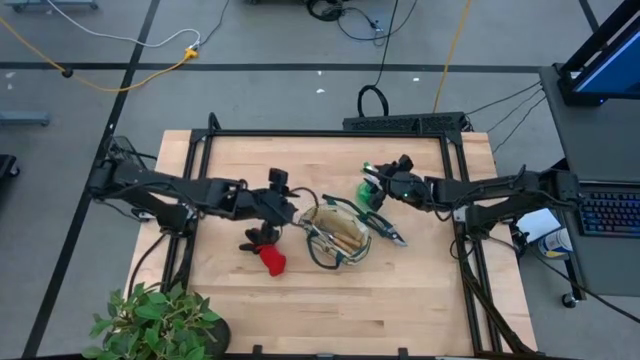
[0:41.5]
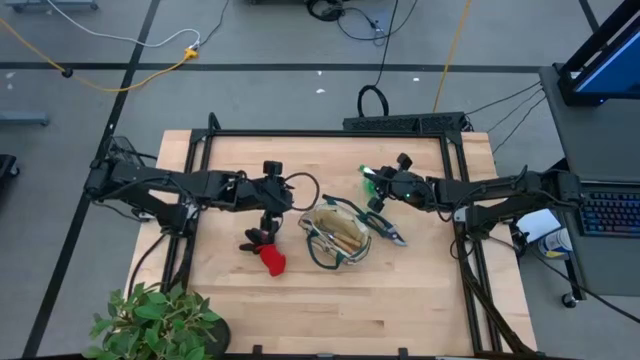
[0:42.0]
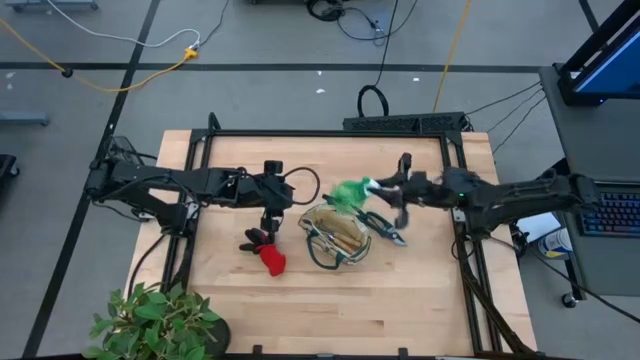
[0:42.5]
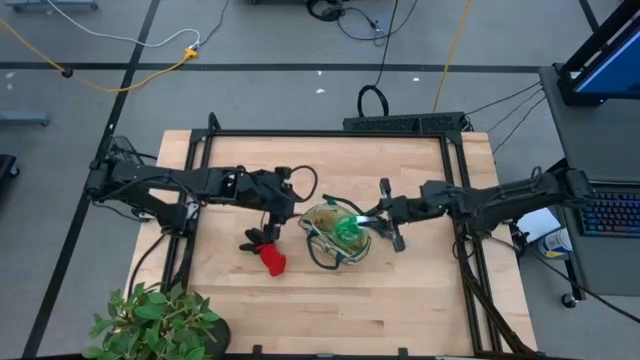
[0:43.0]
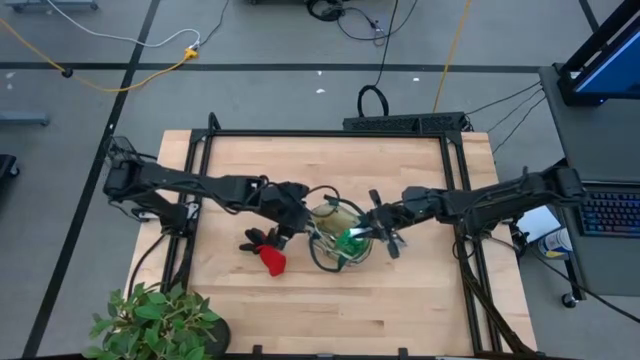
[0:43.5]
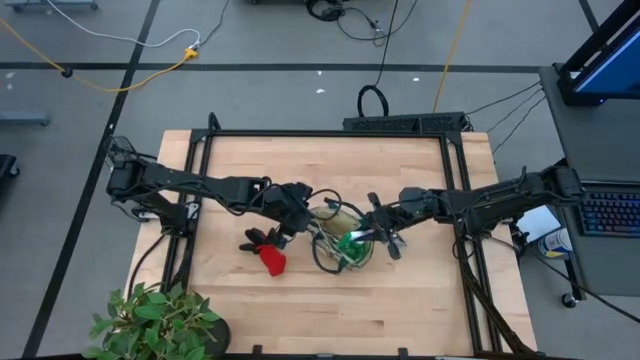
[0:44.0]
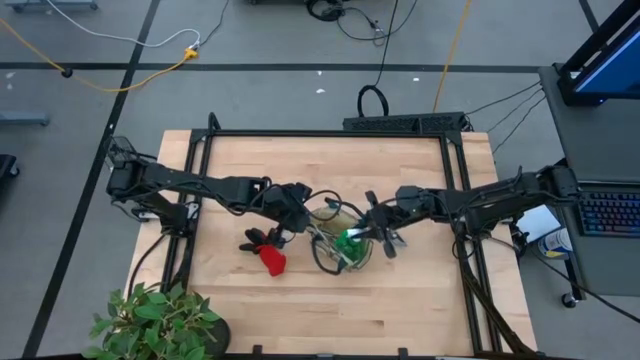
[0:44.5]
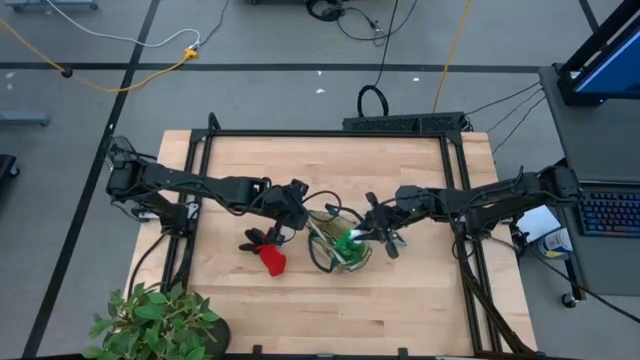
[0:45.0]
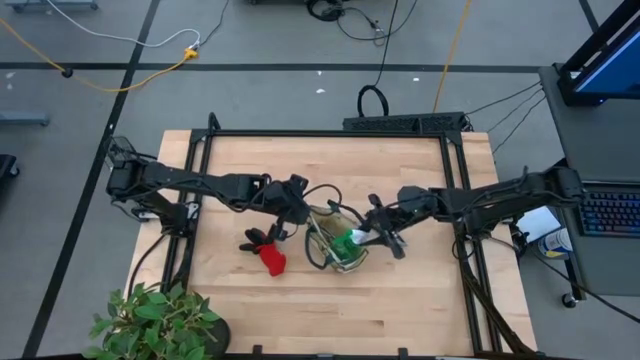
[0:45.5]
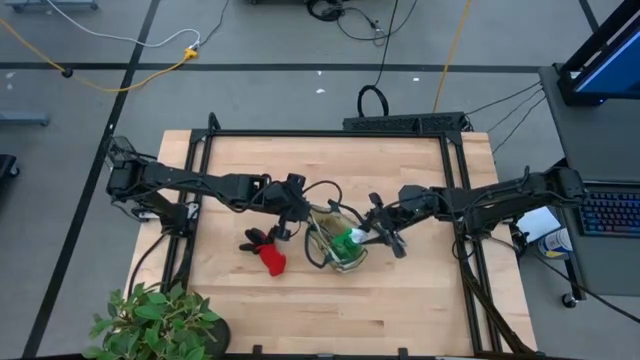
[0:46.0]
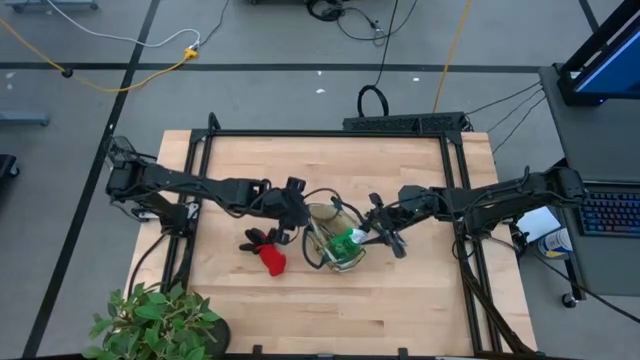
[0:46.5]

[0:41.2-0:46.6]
Task: Pick & Place Garden tools in Gardening bag
Put the green spray bottle into the light brown gardening bag

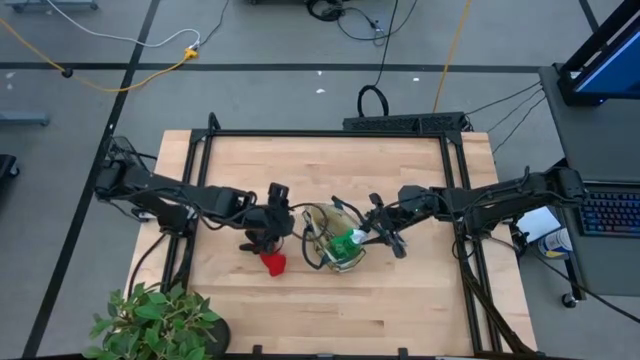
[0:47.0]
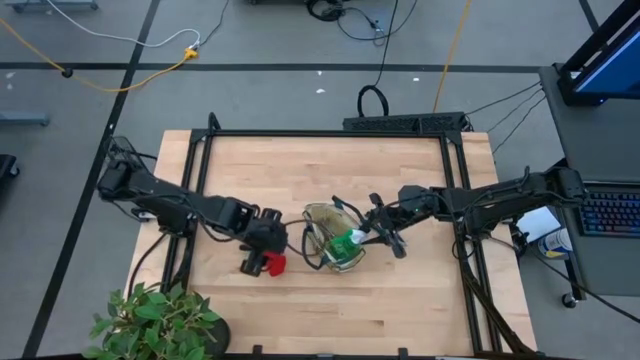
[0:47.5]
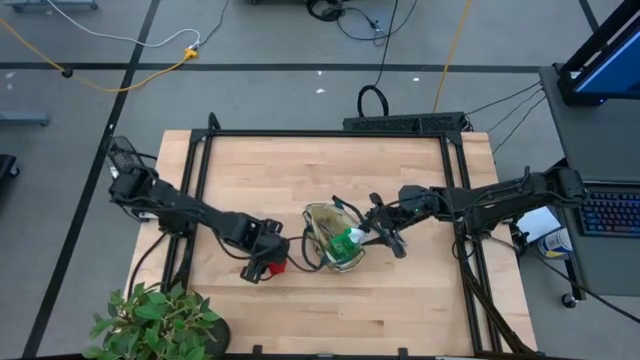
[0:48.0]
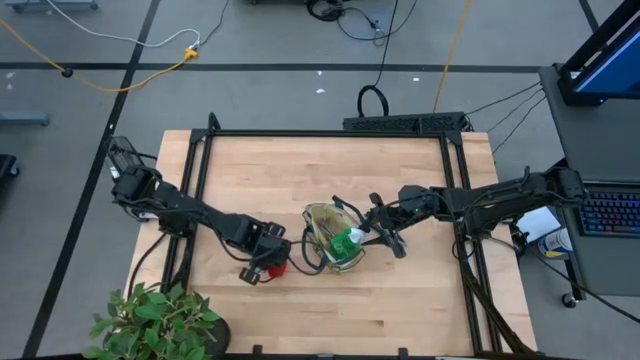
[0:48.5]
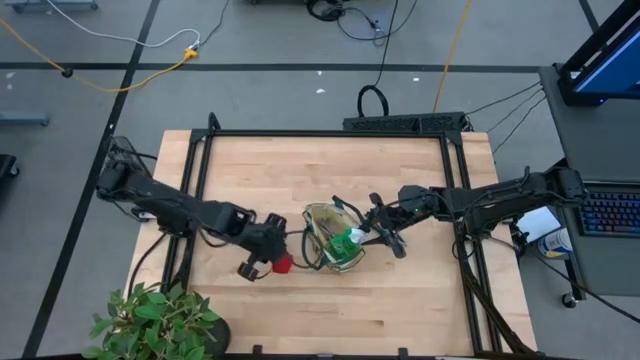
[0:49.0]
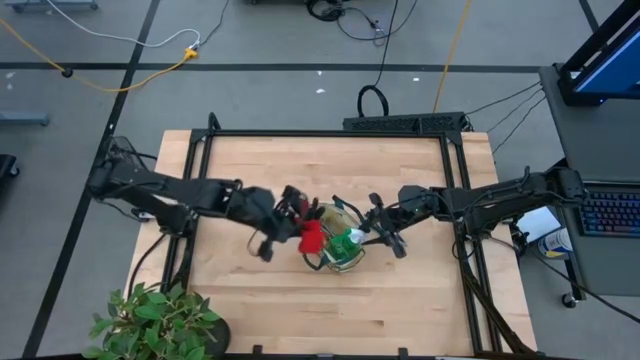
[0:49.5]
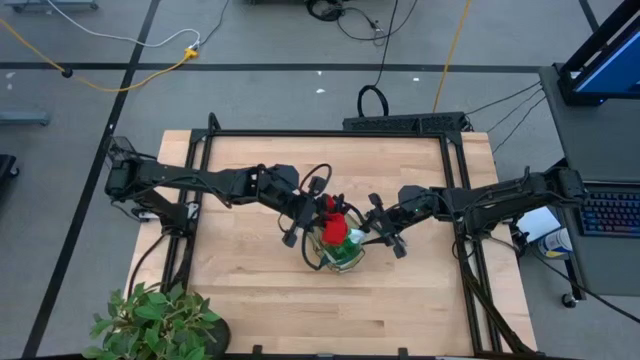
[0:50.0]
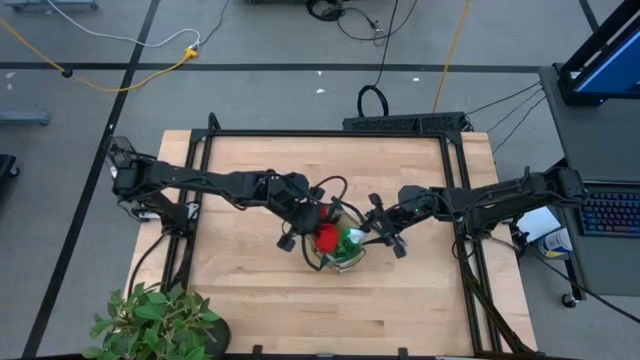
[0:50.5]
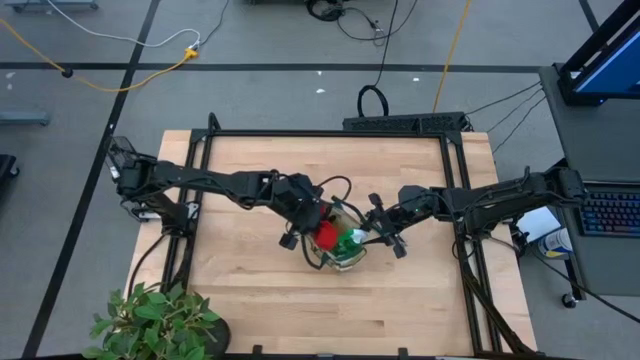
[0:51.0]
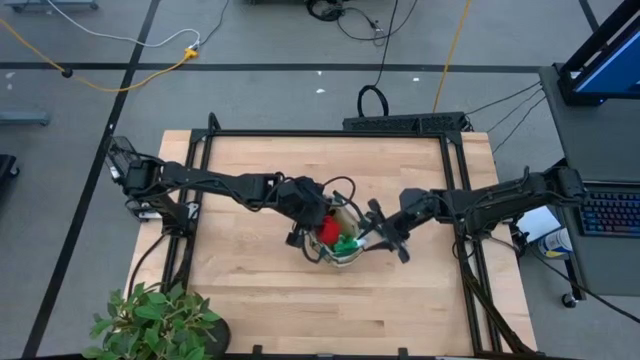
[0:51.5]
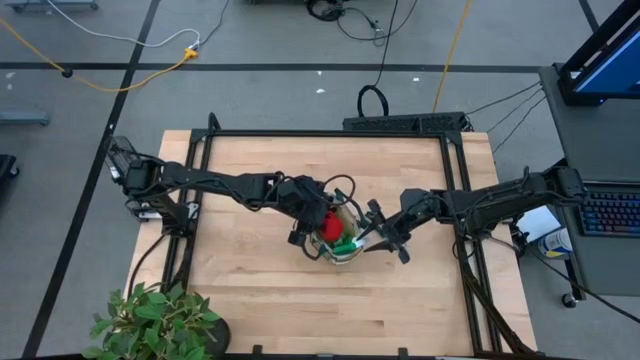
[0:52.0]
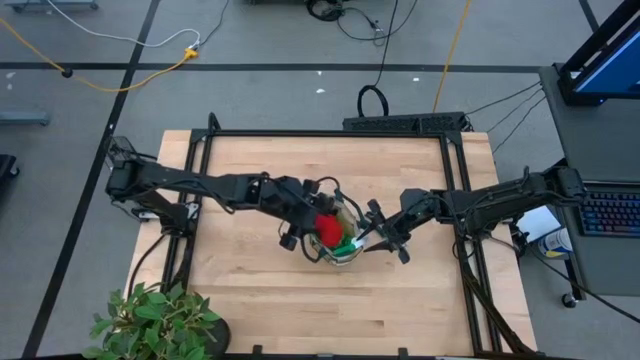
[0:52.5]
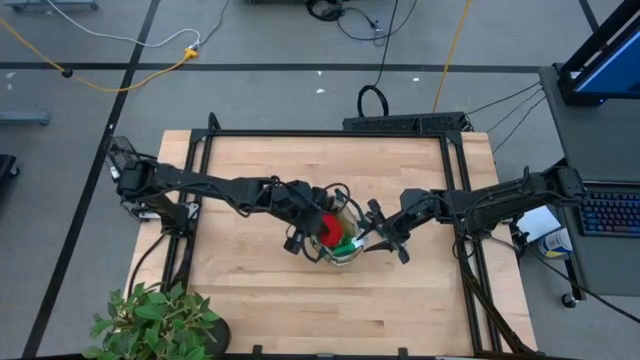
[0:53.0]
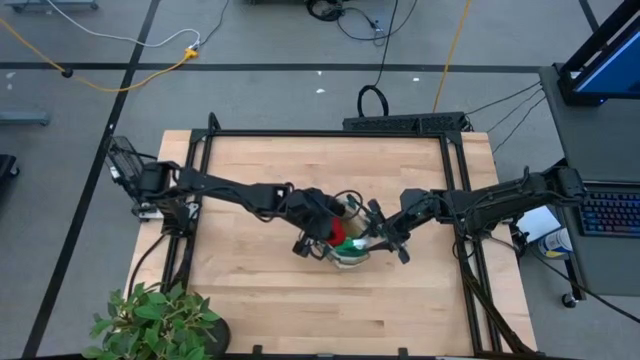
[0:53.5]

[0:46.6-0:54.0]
Put the red gloves into the light brown gardening bag

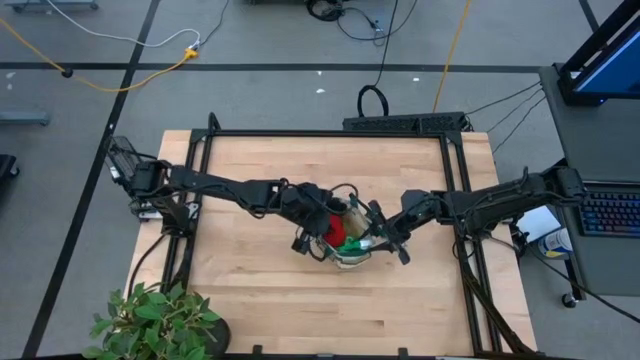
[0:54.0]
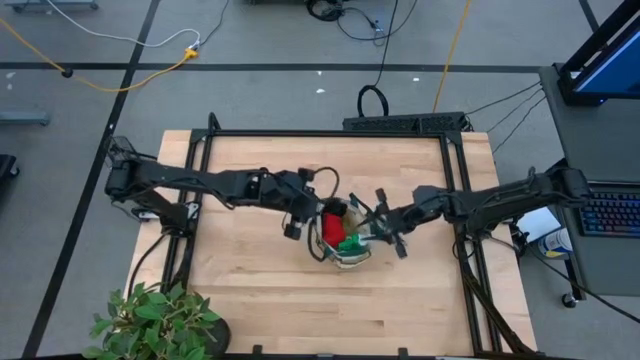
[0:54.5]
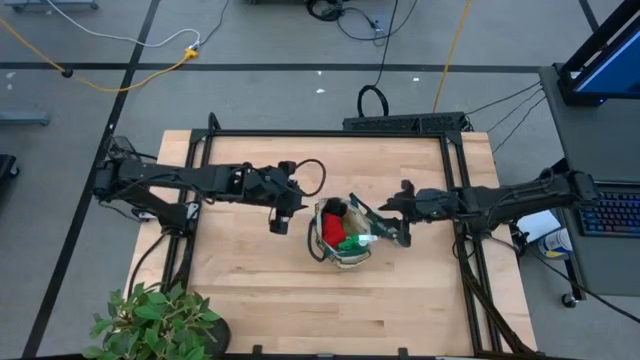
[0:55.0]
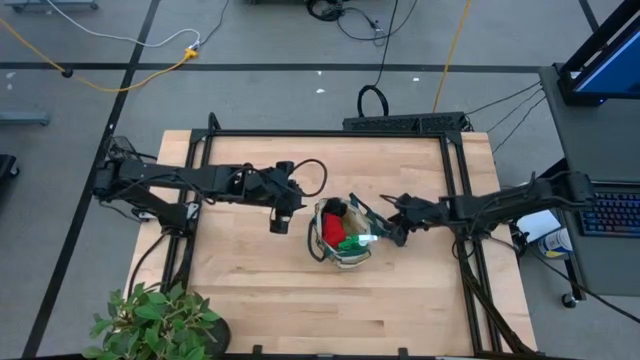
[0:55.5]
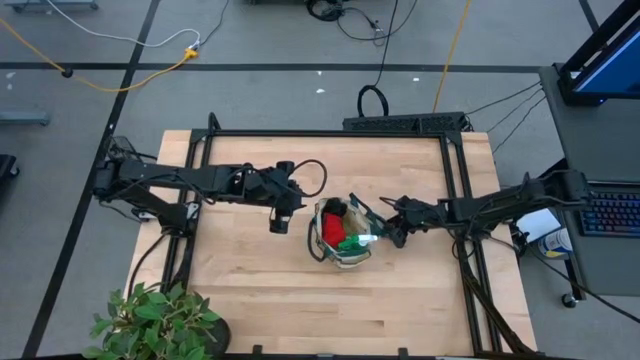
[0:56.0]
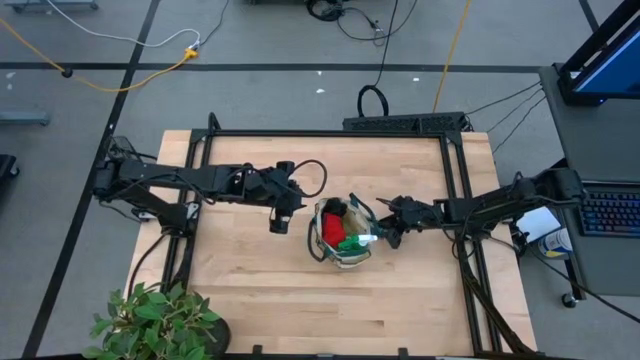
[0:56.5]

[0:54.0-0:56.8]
Put the dark green shear scissors into the light brown gardening bag

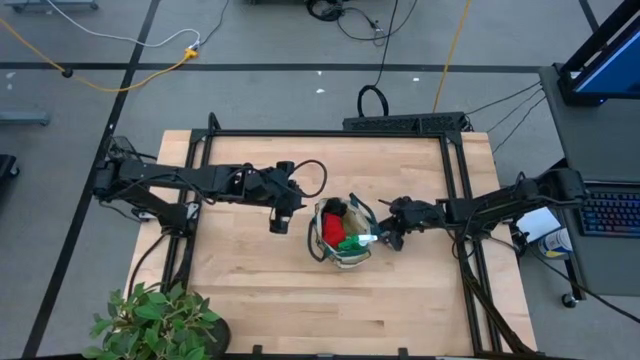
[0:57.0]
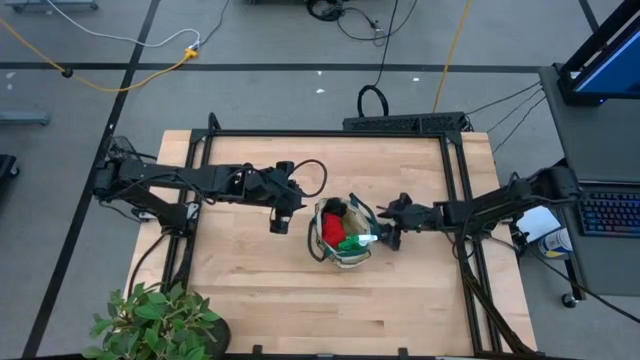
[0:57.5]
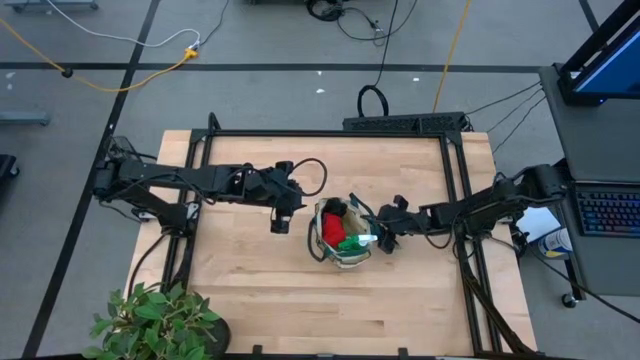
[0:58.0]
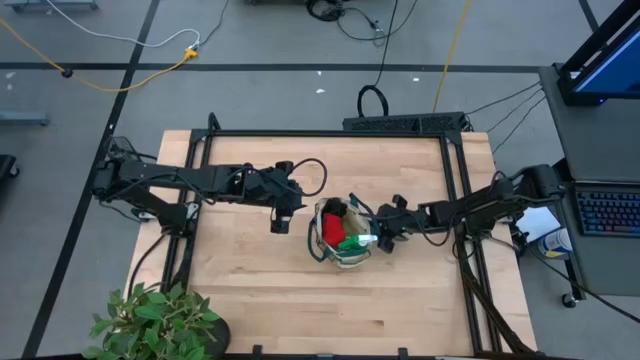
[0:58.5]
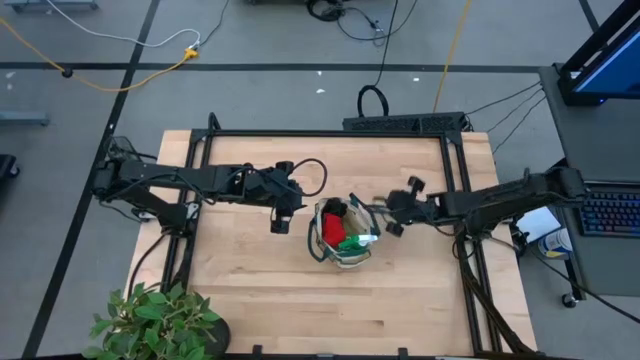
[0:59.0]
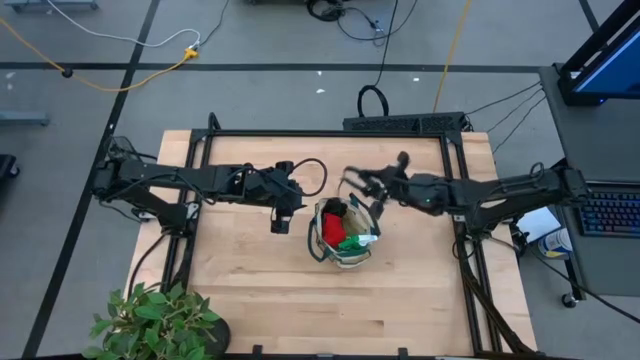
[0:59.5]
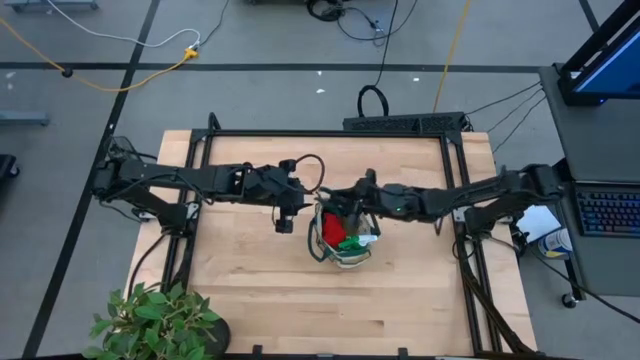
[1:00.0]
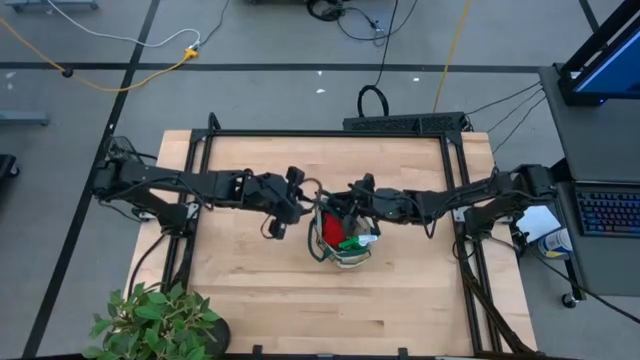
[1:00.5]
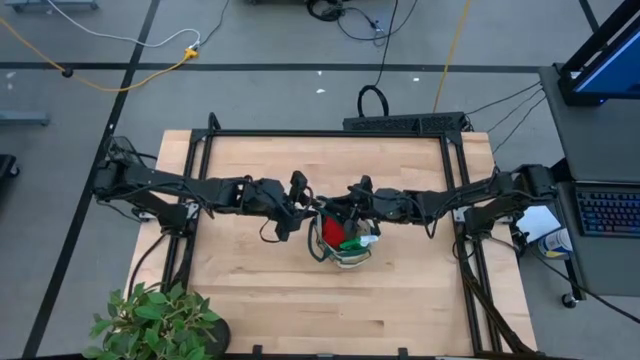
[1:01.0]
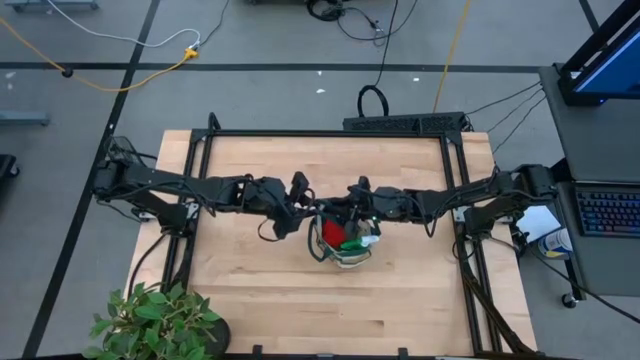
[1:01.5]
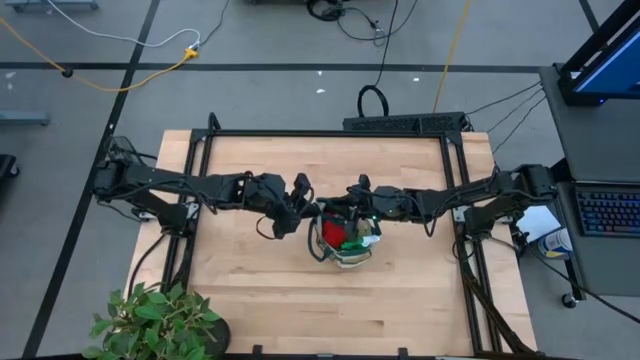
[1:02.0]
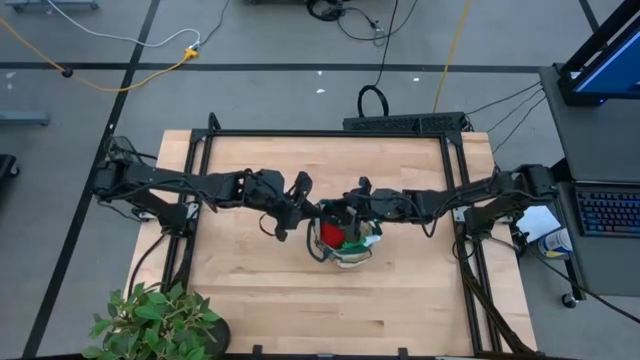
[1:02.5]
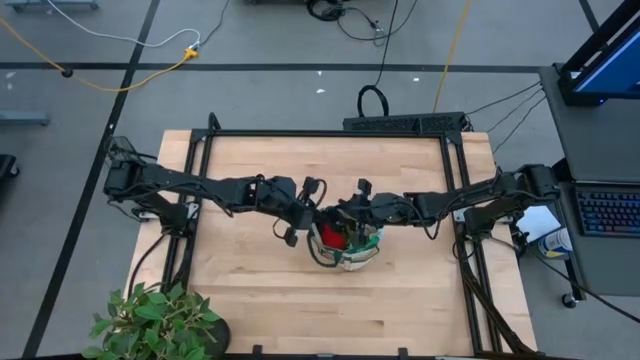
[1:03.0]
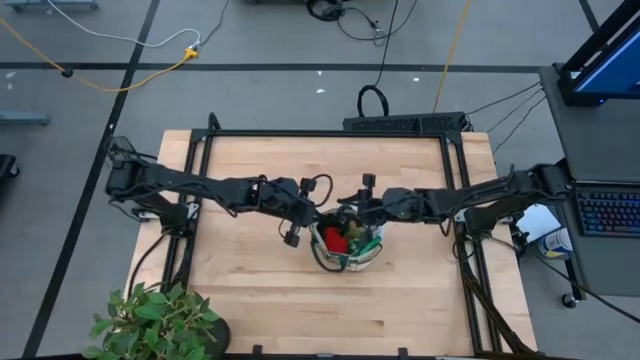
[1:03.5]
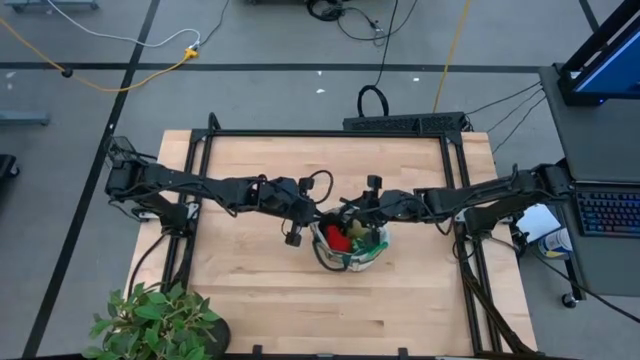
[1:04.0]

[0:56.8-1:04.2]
Put the dark green shear scissors into the light brown gardening bag
